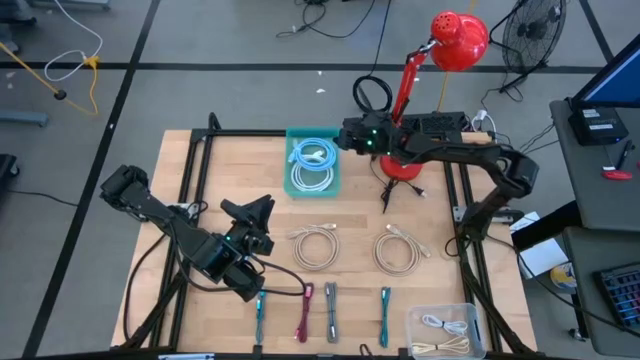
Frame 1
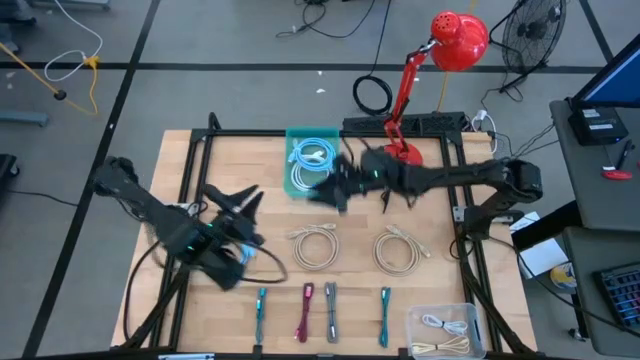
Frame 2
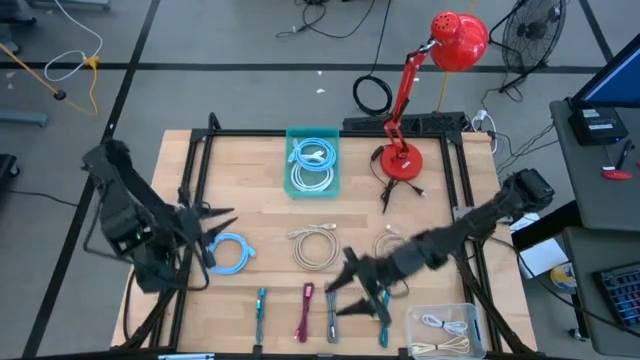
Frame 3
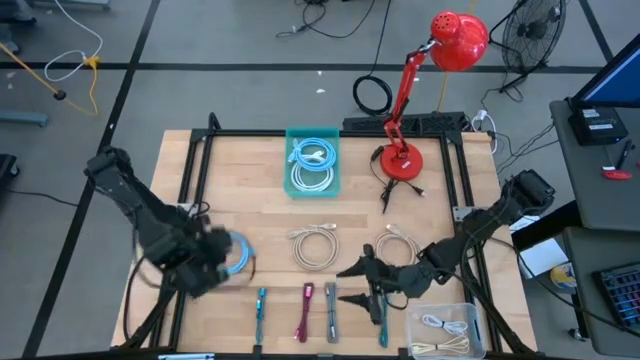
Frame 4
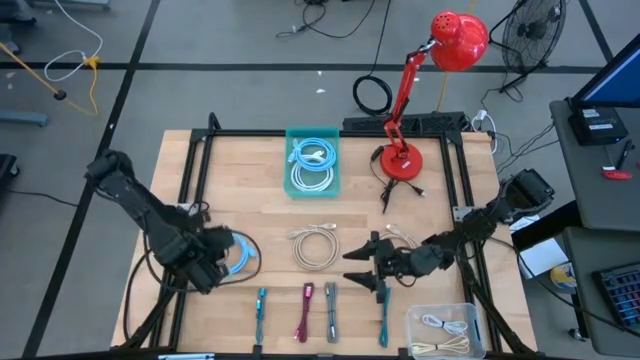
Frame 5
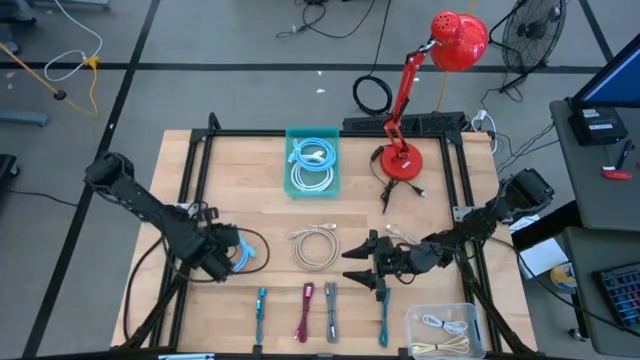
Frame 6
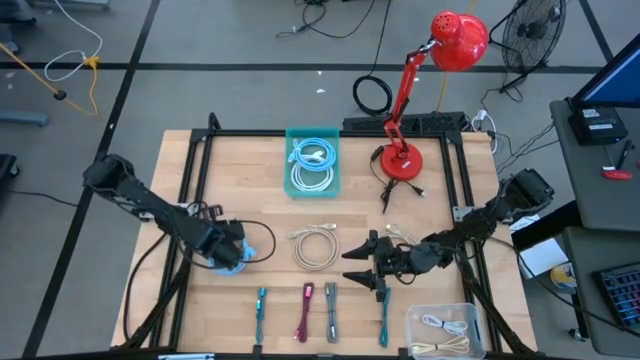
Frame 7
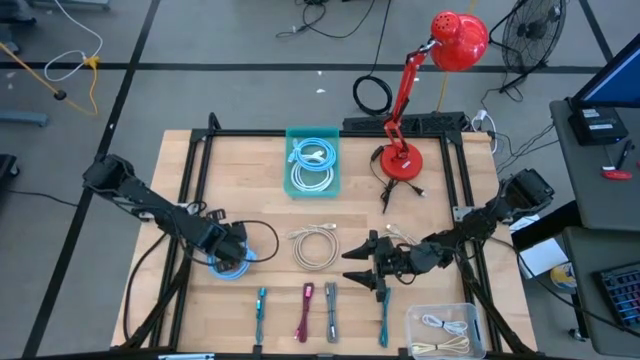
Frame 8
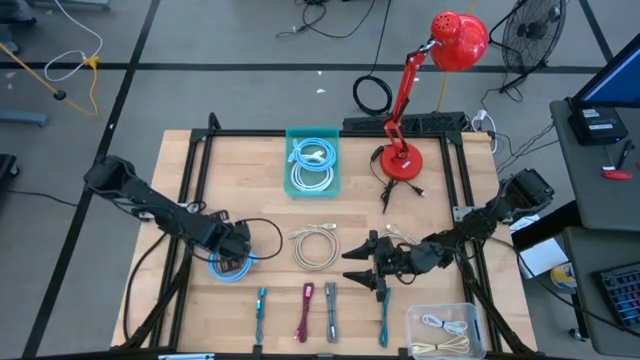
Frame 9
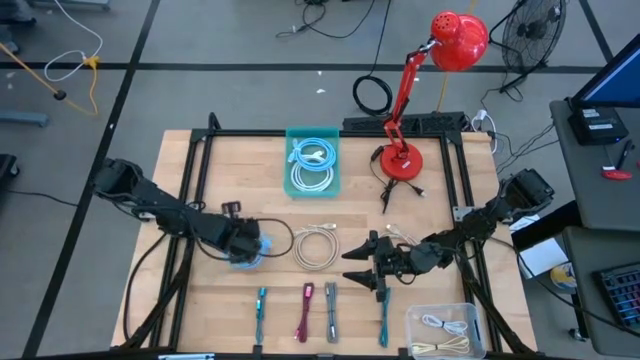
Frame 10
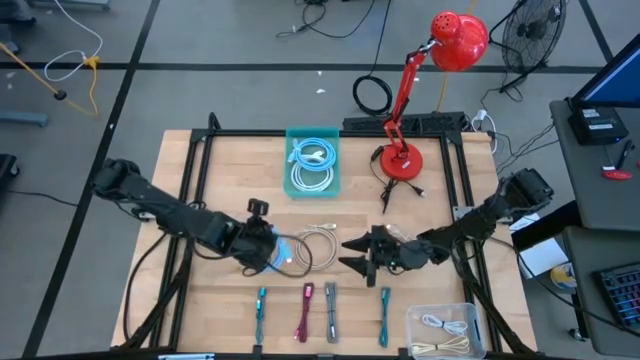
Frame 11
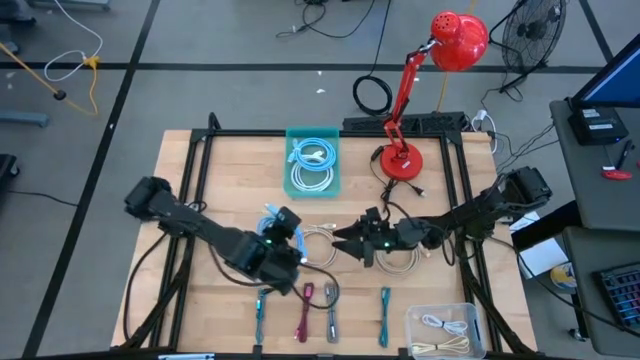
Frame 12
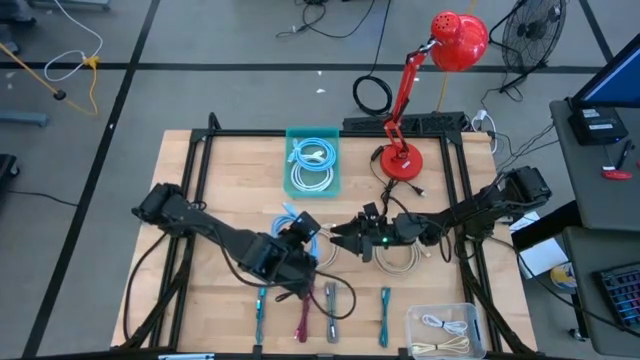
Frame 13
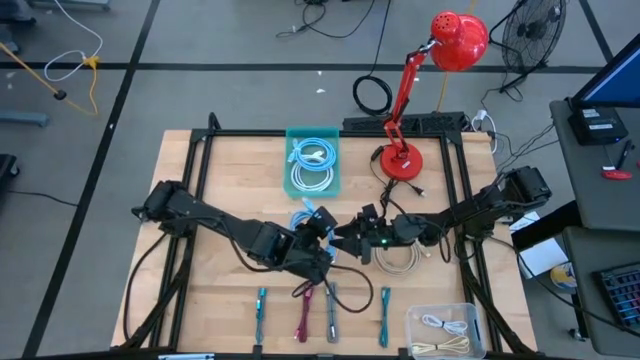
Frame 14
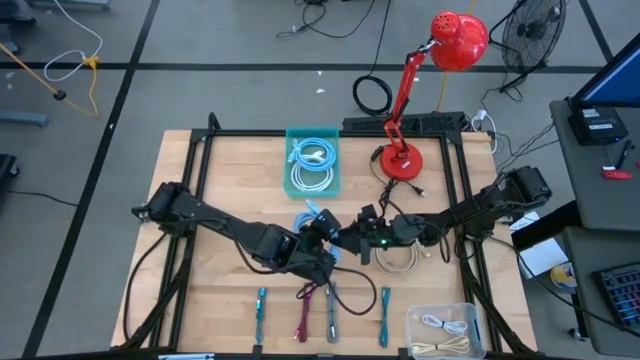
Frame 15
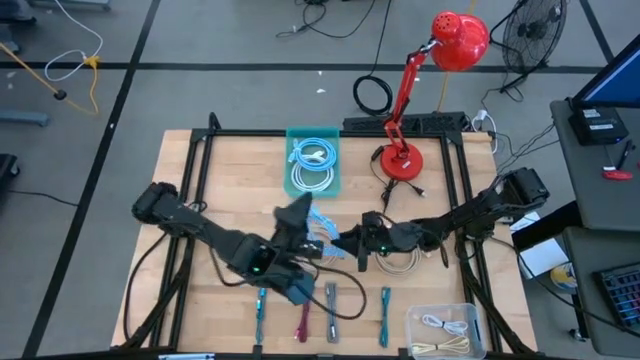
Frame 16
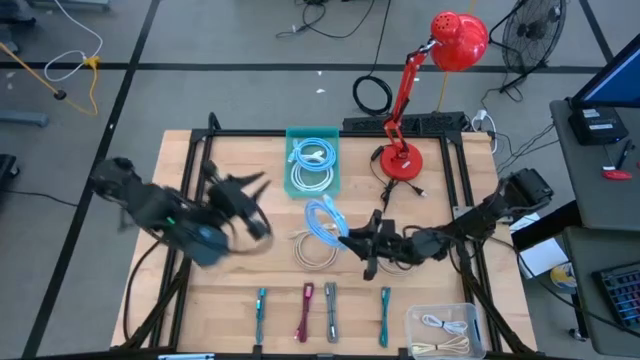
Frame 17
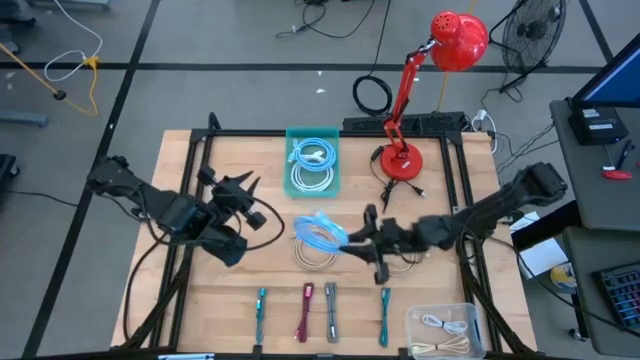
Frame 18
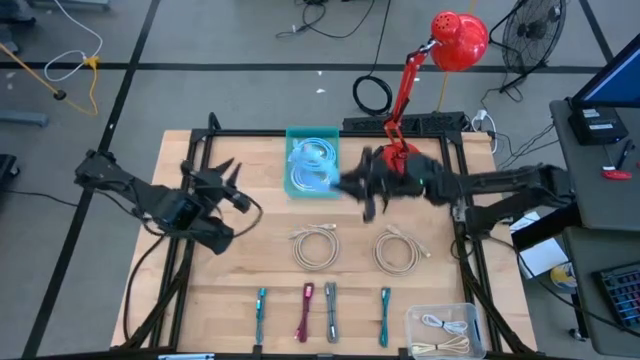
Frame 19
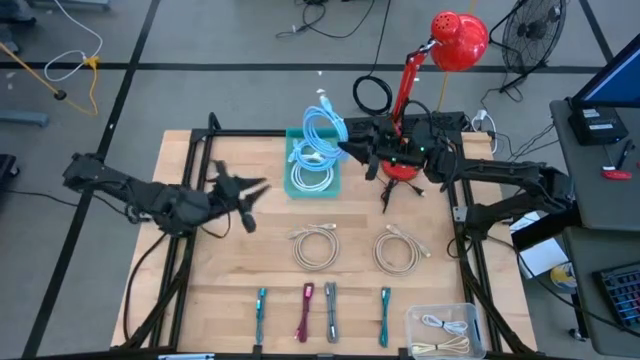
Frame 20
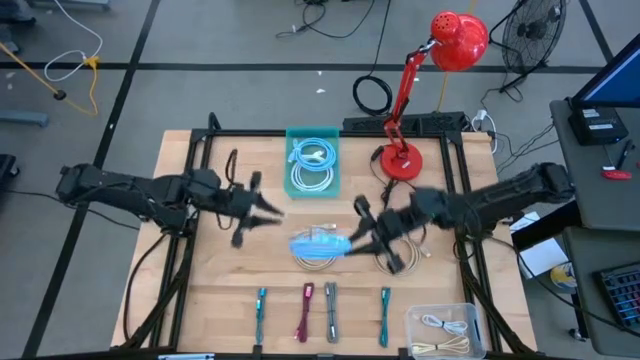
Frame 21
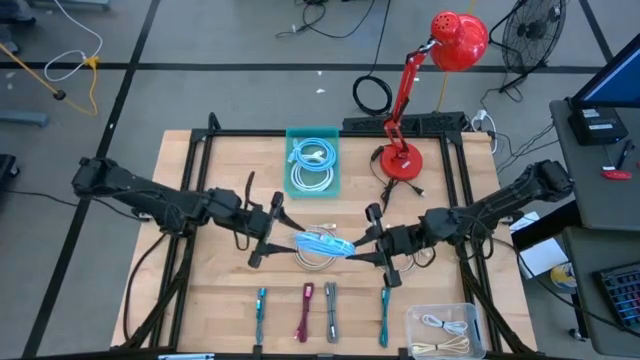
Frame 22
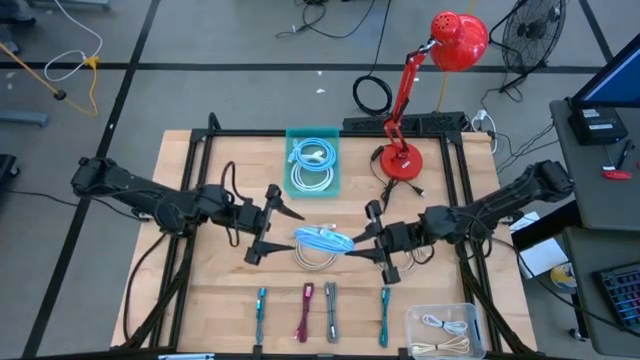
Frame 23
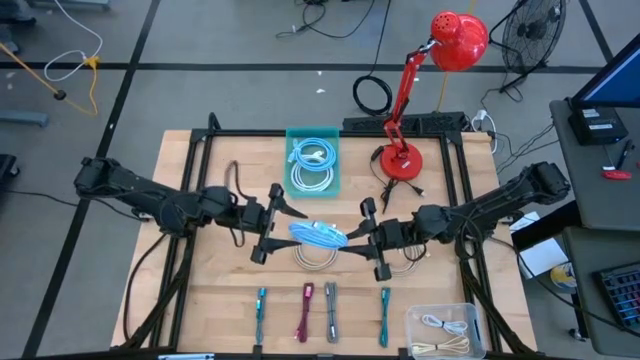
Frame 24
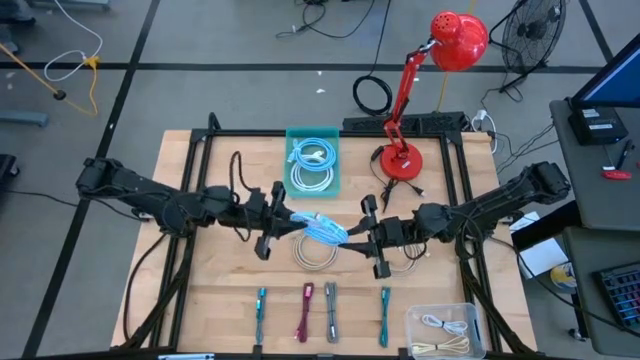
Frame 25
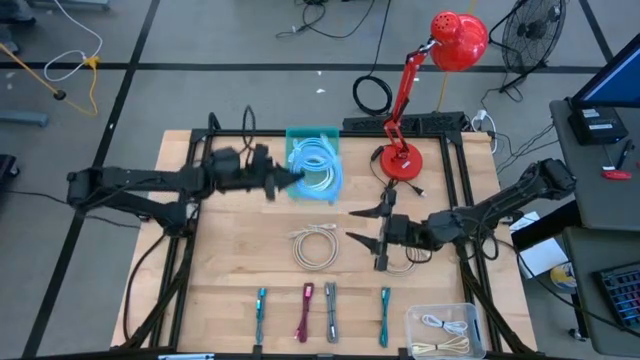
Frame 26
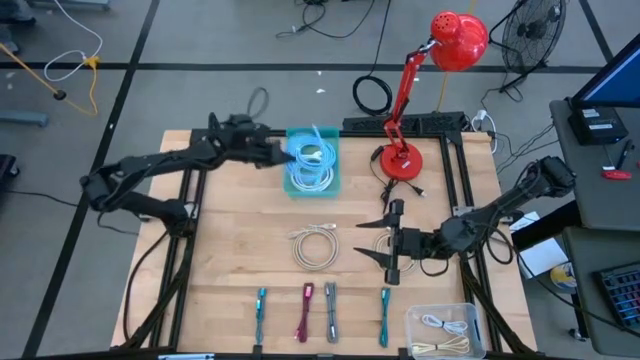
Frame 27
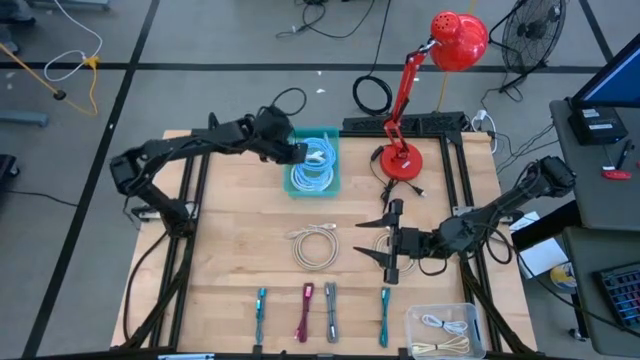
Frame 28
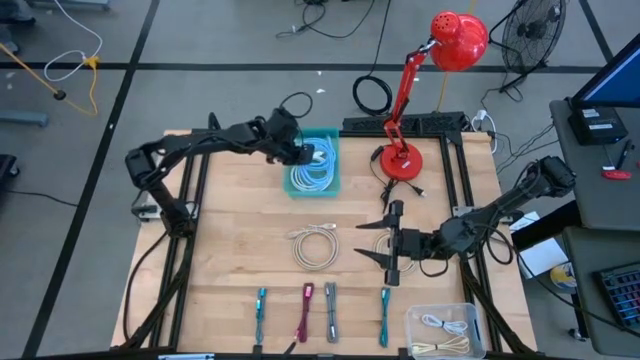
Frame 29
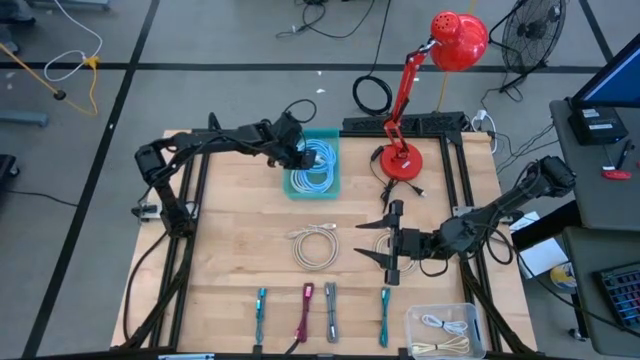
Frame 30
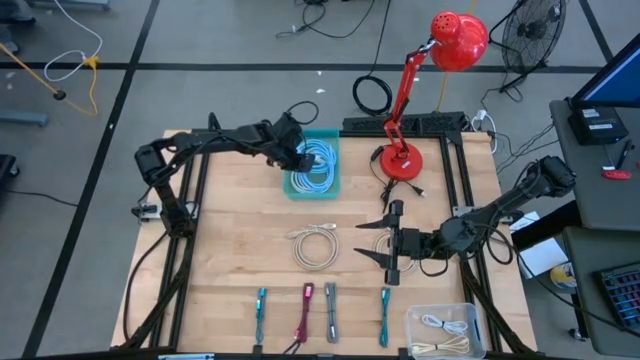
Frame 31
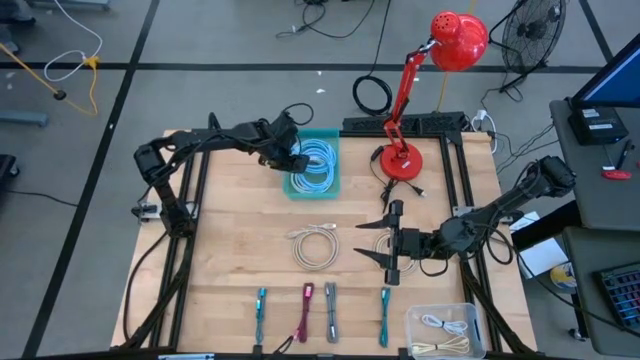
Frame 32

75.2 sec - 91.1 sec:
Task: Pick & Place USB Port
Put the blue HDMI cable into the green bin

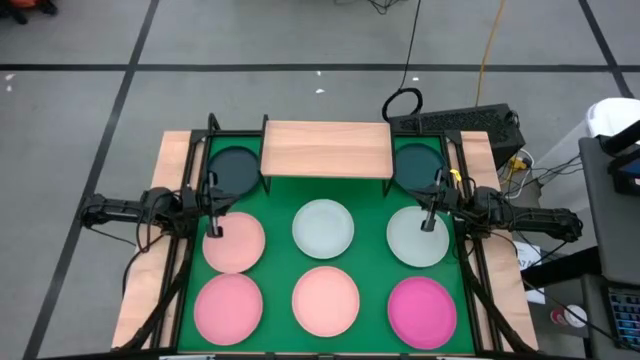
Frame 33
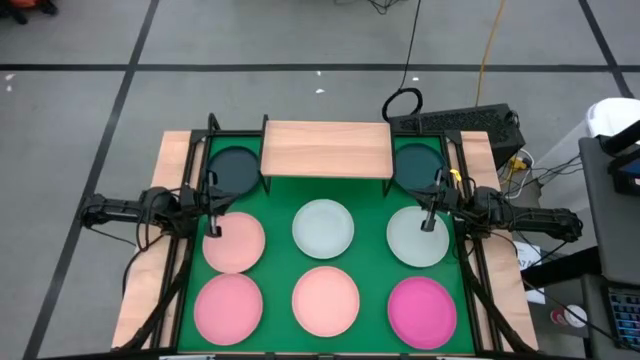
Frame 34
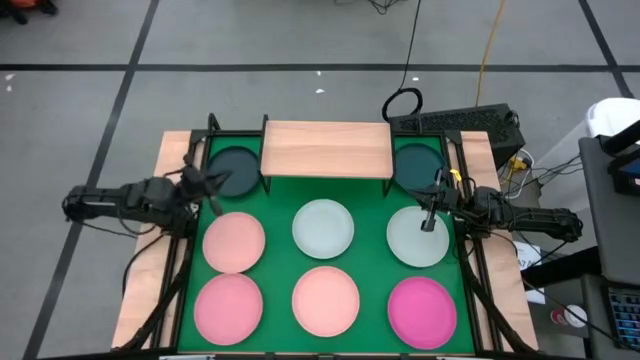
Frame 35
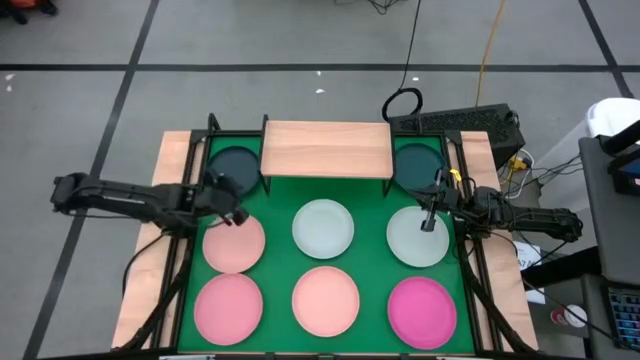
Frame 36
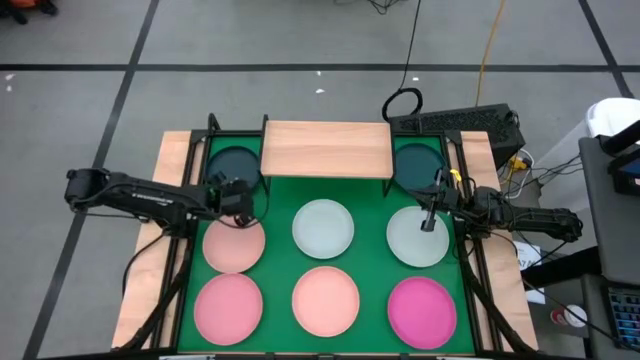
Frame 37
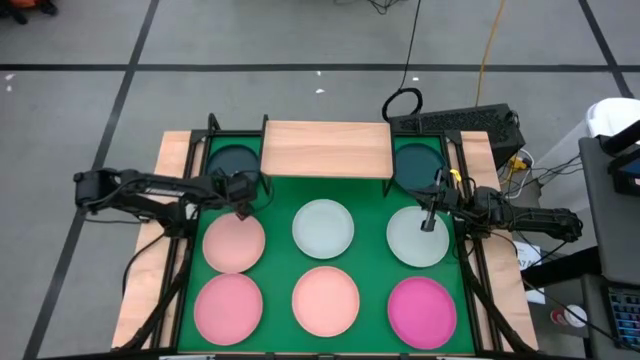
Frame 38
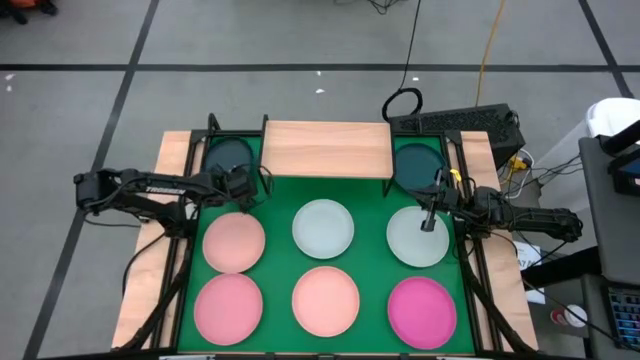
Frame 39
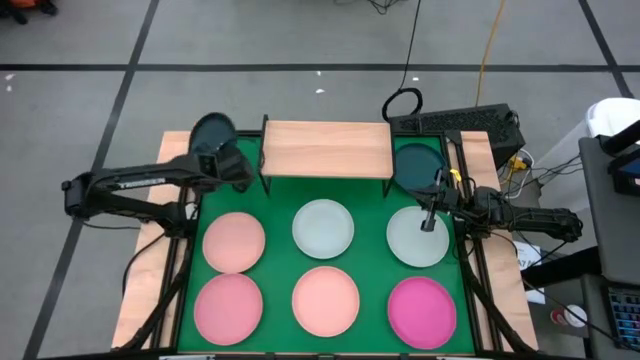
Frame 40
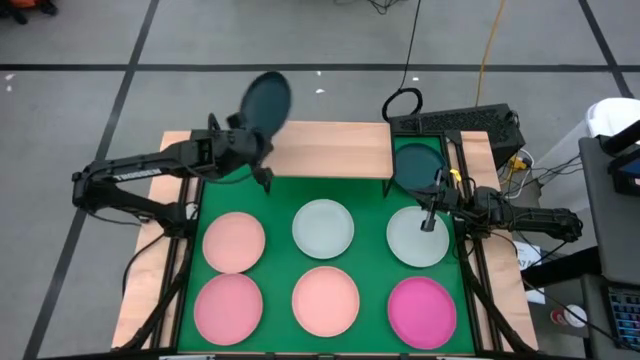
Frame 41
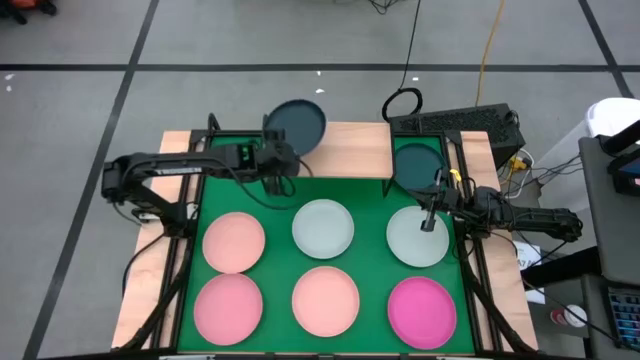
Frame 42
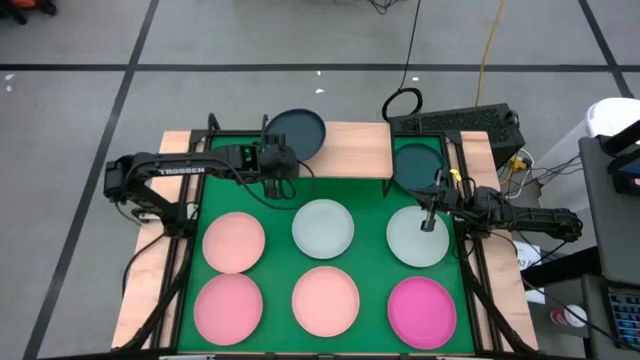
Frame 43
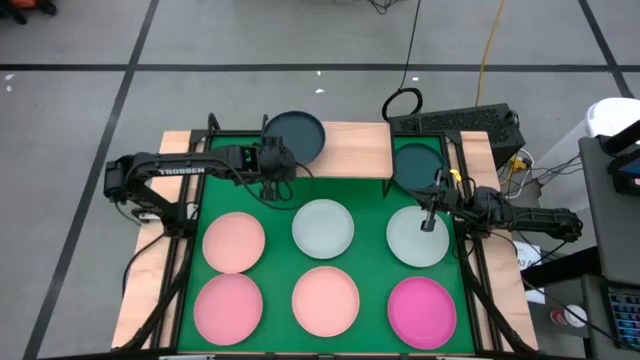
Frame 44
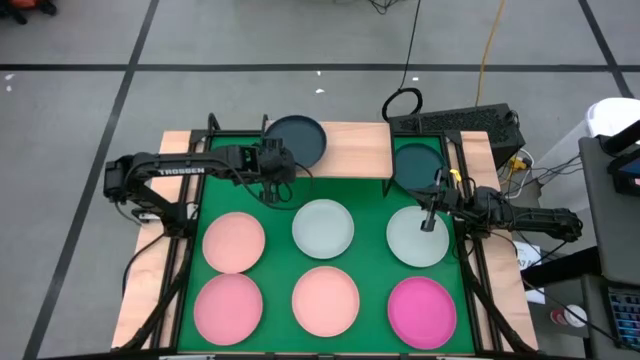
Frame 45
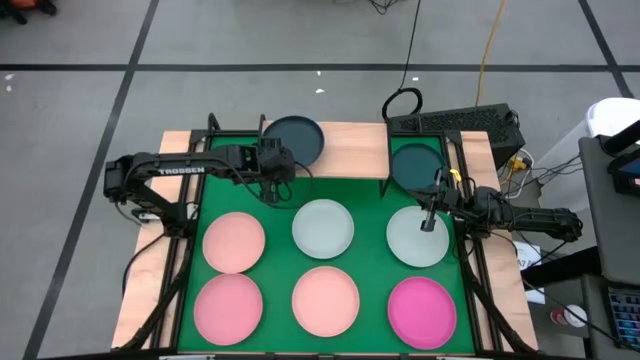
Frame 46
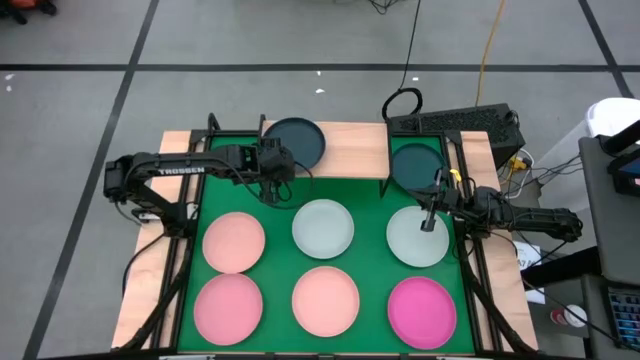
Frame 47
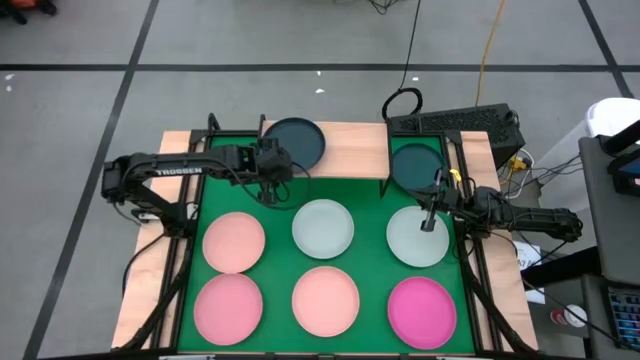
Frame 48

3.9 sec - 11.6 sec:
Task: Place and stack plates onto a shelf
Put the left black plate on the shelf
